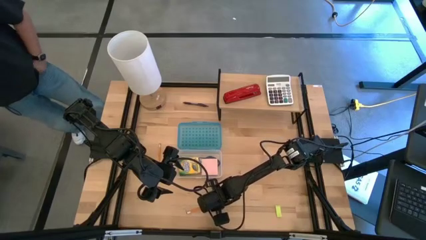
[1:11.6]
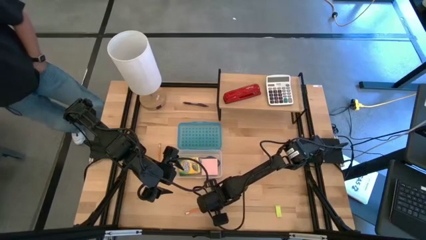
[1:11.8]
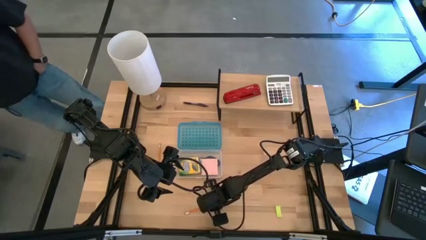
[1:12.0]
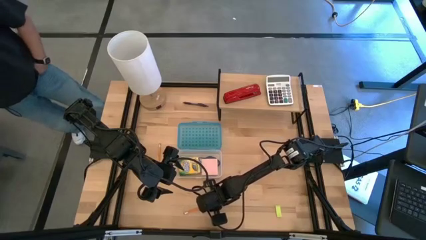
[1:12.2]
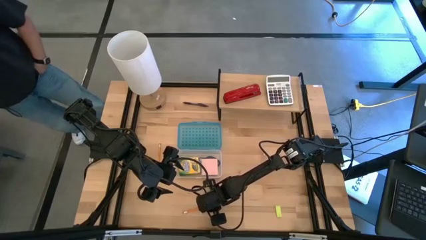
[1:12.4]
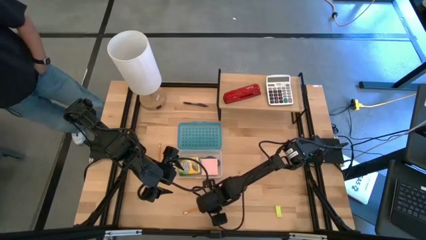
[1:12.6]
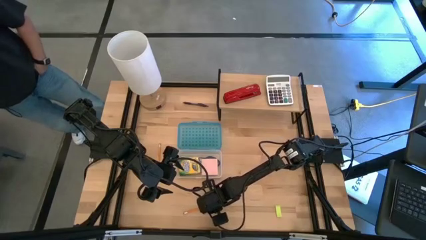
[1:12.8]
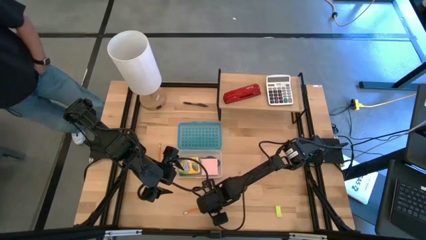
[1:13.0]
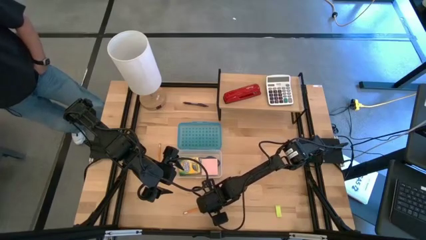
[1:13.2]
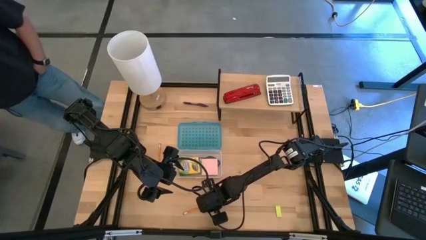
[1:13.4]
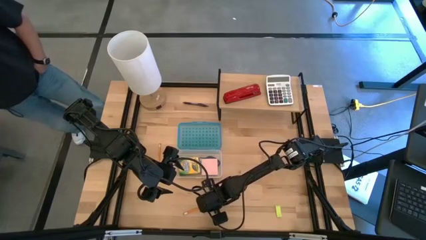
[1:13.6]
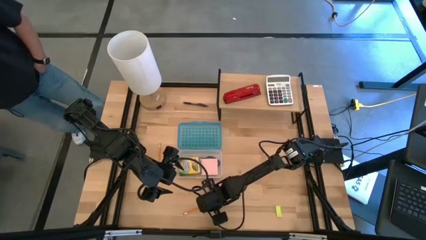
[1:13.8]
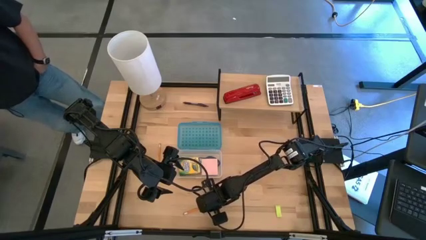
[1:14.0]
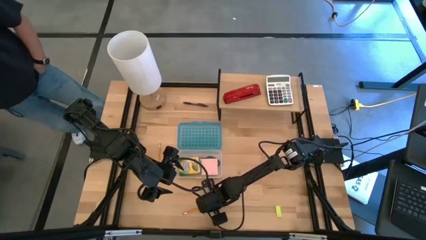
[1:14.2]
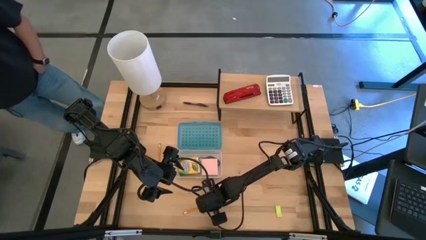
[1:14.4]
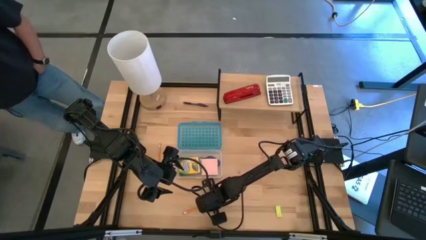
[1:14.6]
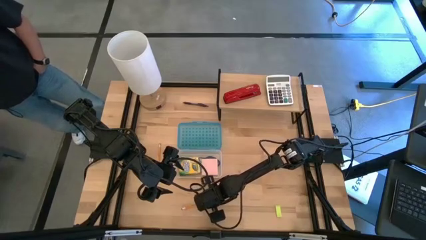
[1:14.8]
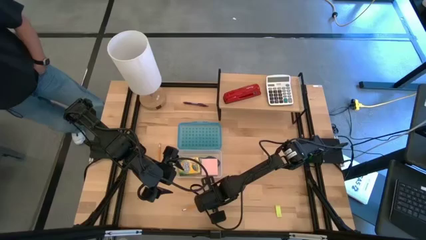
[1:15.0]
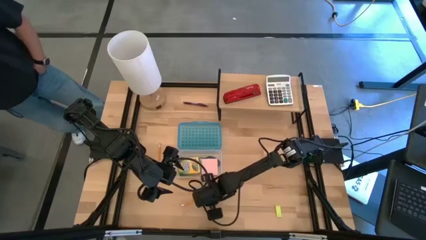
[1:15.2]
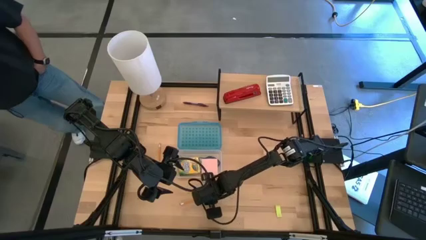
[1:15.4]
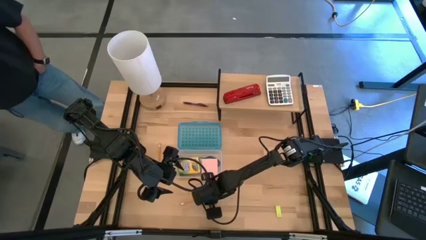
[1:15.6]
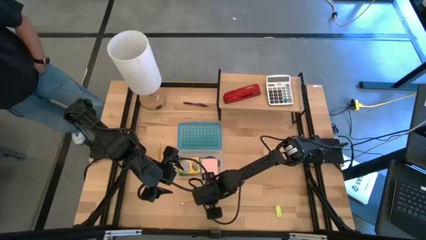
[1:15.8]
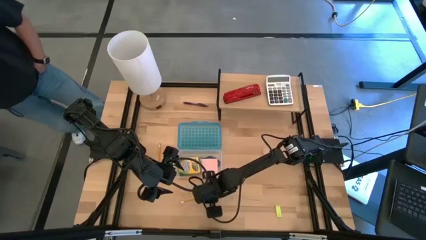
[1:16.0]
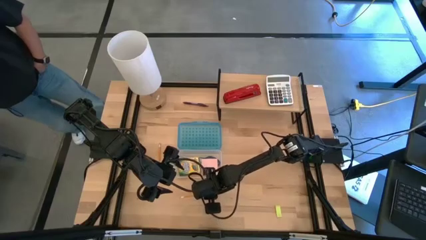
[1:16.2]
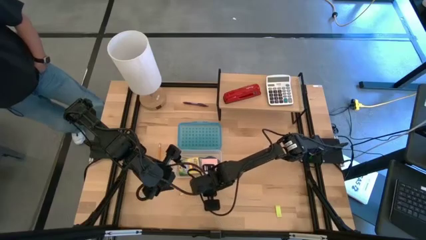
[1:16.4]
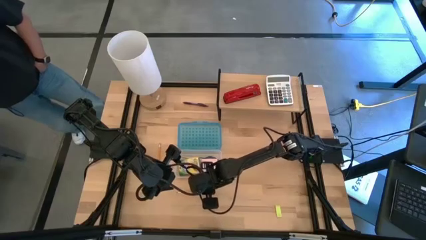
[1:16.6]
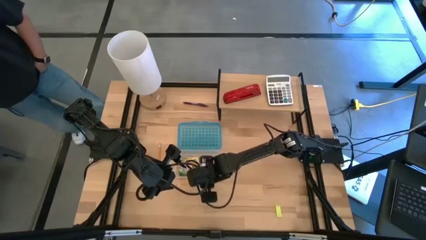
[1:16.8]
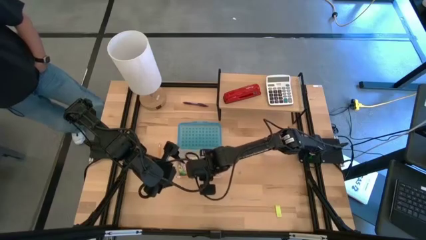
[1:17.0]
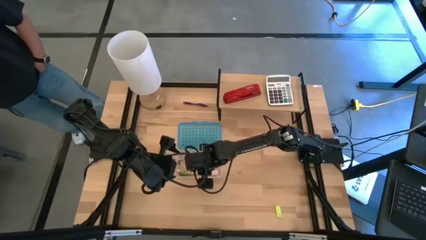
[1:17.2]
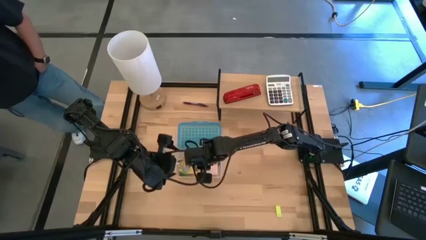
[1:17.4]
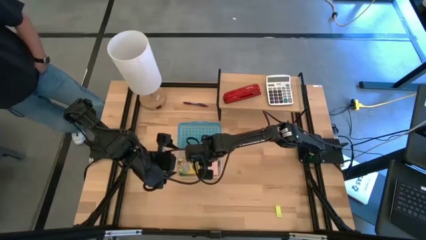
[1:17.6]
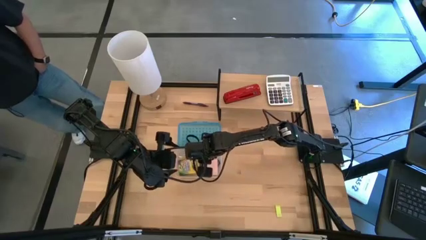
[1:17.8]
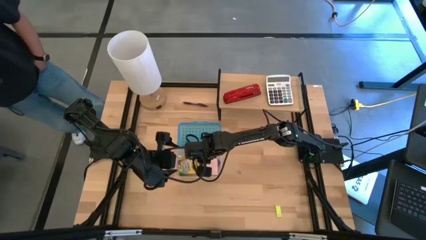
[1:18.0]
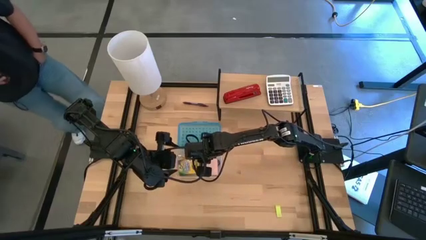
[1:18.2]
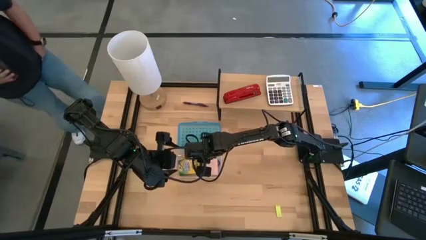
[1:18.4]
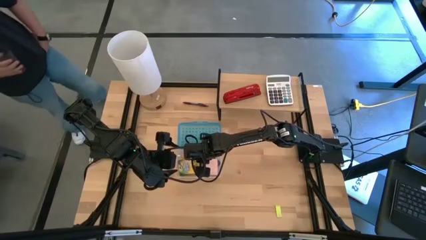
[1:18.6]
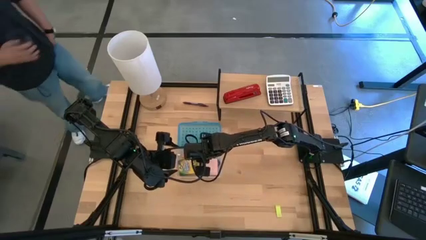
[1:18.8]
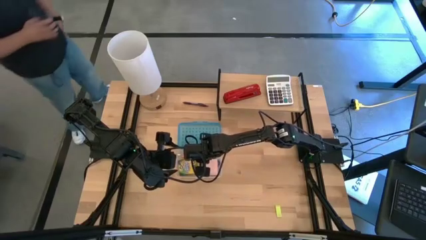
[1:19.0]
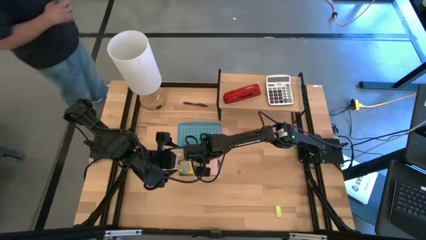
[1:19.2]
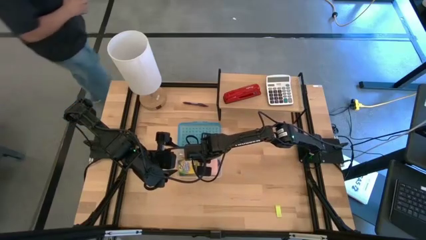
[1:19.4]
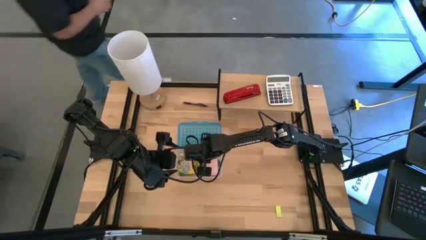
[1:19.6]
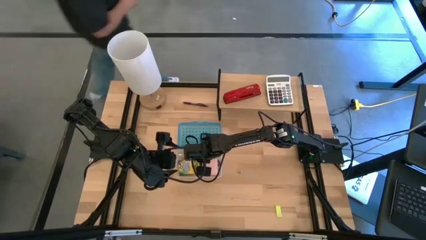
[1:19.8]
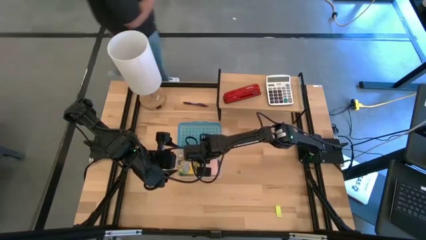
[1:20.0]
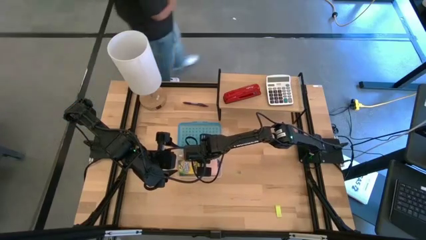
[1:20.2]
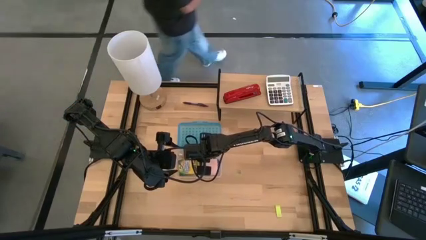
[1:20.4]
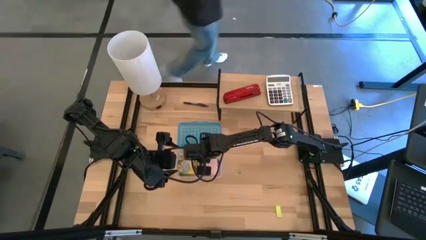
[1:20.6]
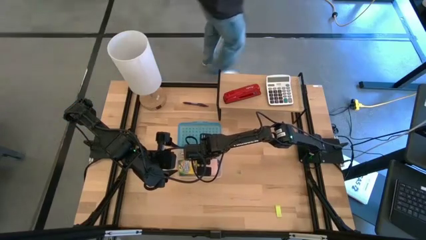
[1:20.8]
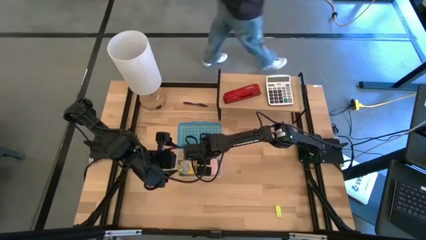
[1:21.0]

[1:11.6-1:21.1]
Task: Pack school essentials
Put the yellow pencil into the blue supply box

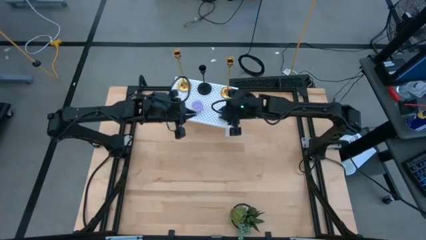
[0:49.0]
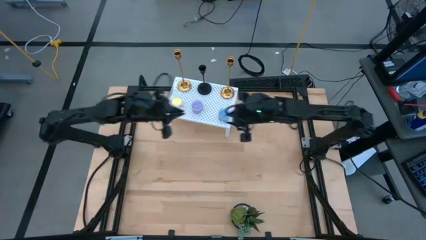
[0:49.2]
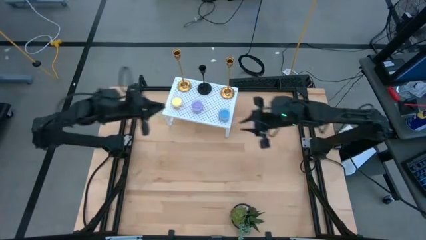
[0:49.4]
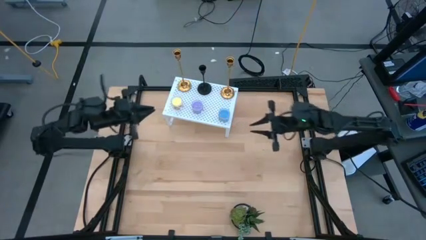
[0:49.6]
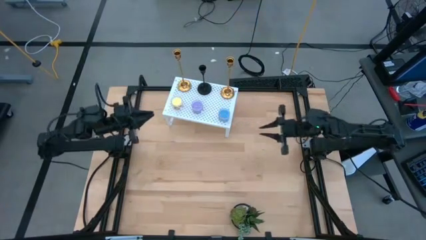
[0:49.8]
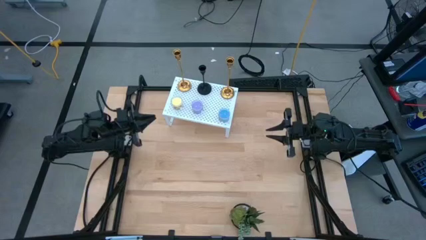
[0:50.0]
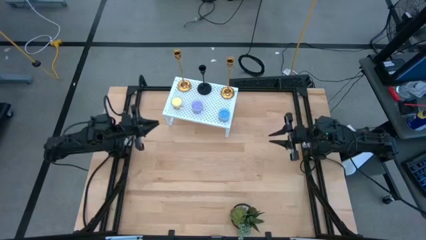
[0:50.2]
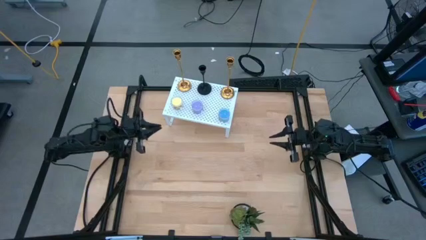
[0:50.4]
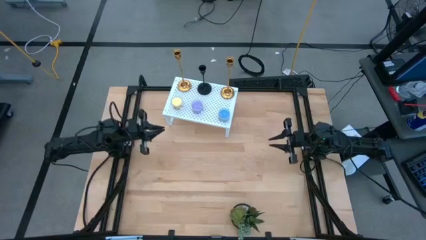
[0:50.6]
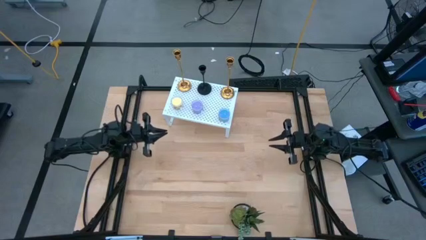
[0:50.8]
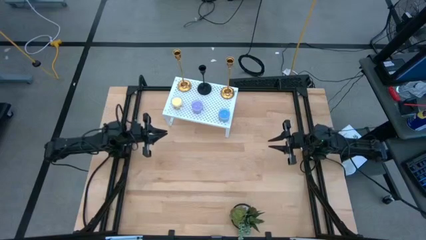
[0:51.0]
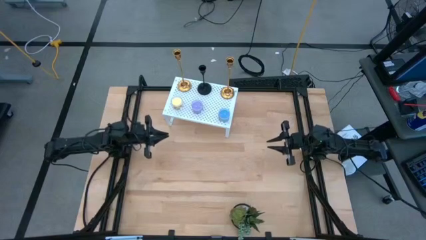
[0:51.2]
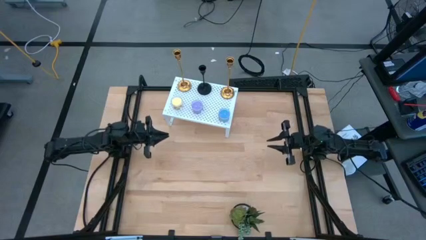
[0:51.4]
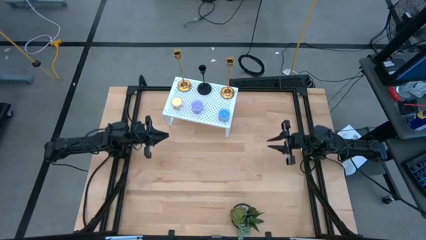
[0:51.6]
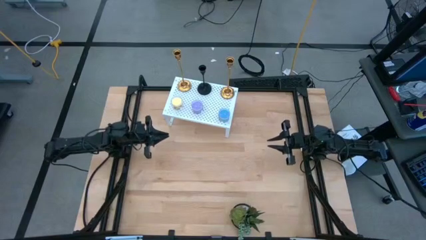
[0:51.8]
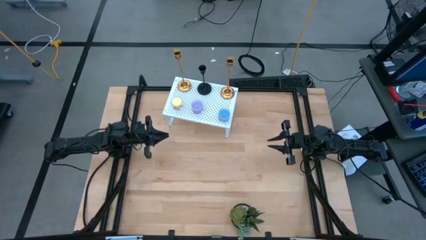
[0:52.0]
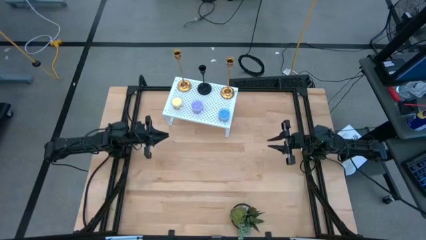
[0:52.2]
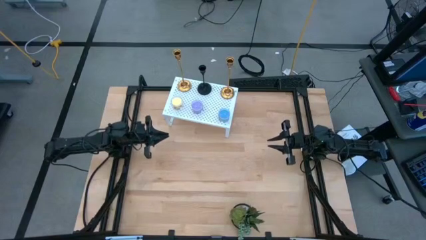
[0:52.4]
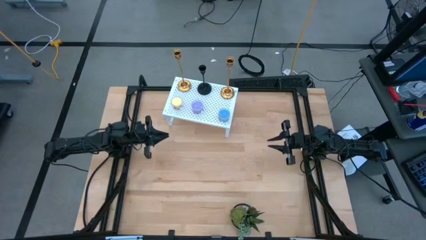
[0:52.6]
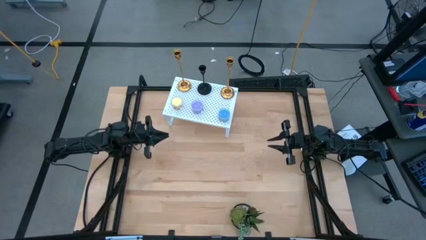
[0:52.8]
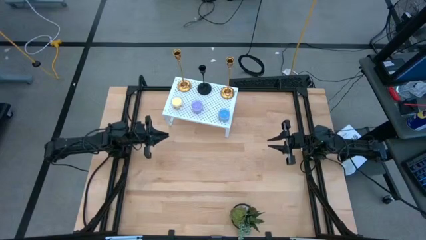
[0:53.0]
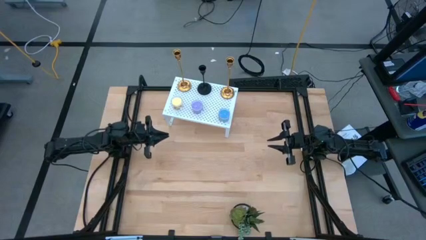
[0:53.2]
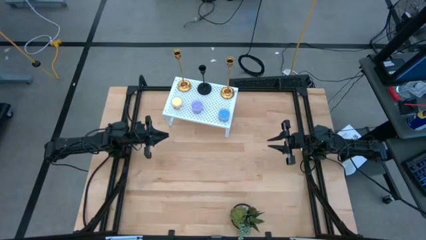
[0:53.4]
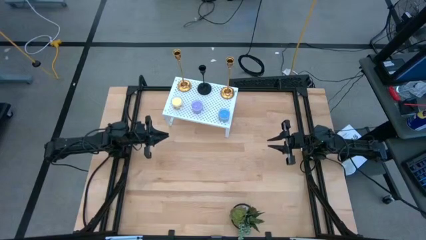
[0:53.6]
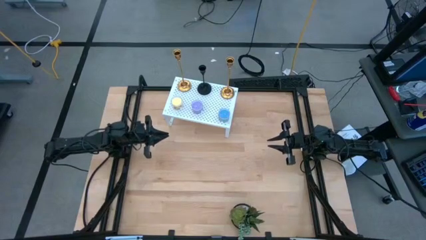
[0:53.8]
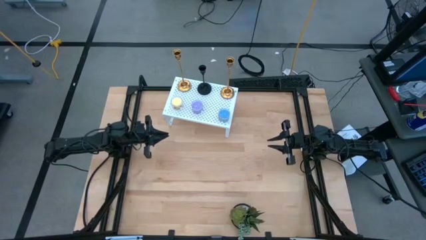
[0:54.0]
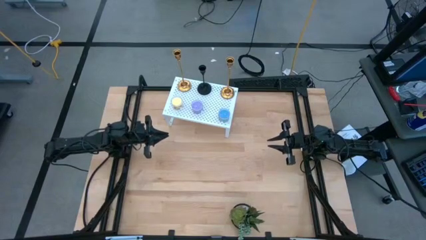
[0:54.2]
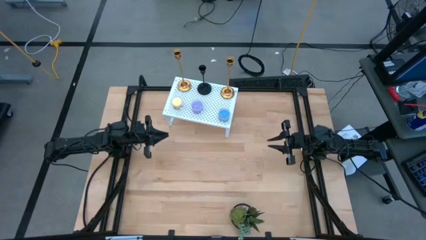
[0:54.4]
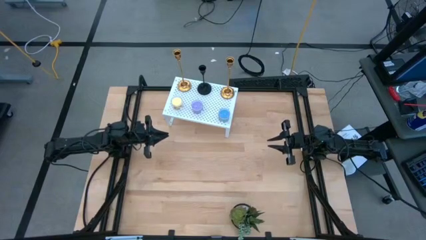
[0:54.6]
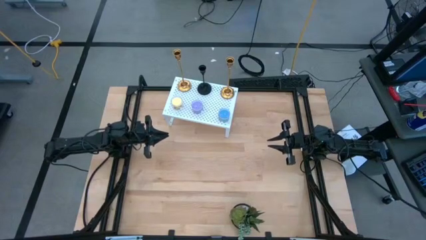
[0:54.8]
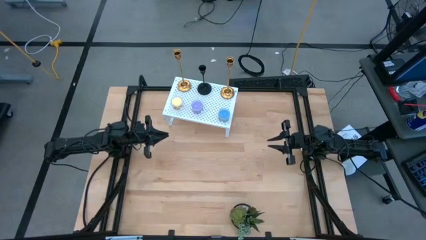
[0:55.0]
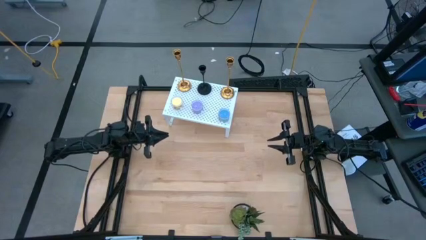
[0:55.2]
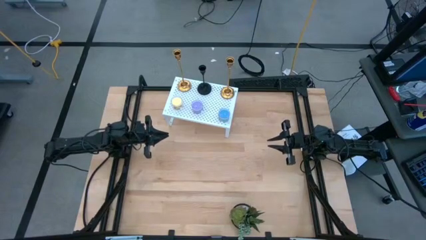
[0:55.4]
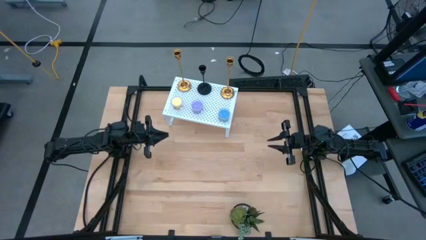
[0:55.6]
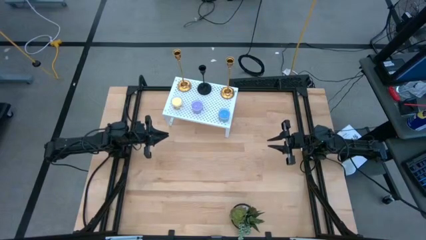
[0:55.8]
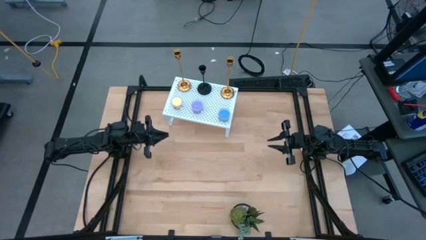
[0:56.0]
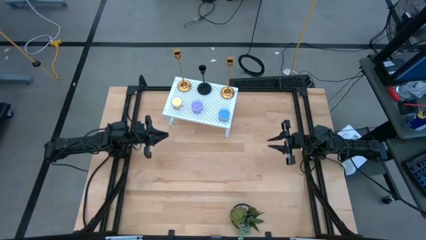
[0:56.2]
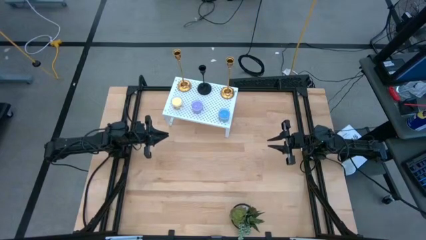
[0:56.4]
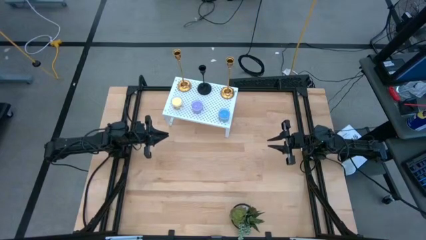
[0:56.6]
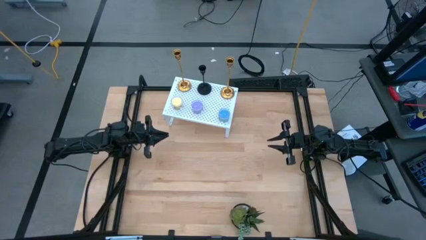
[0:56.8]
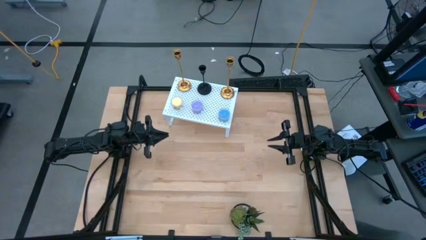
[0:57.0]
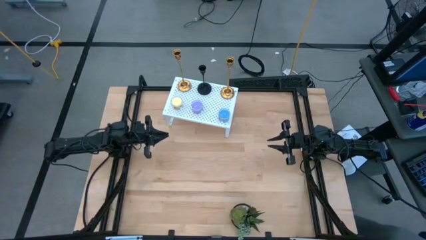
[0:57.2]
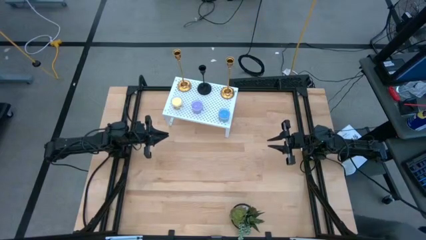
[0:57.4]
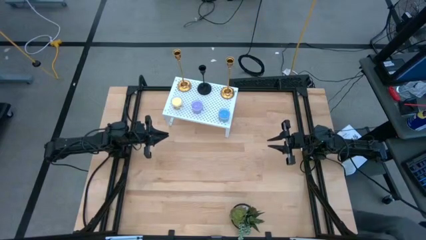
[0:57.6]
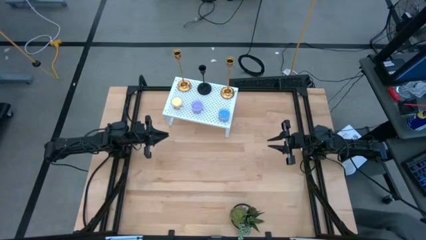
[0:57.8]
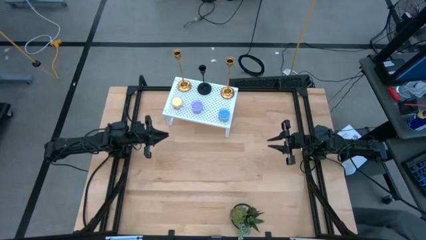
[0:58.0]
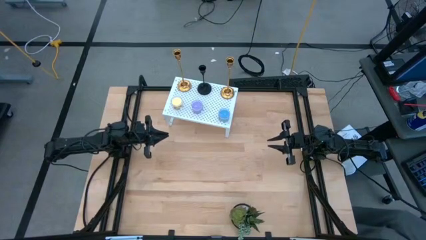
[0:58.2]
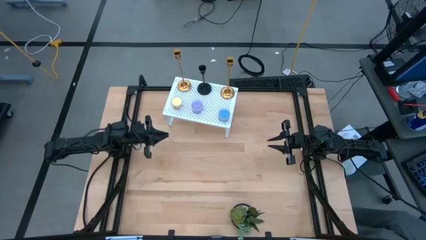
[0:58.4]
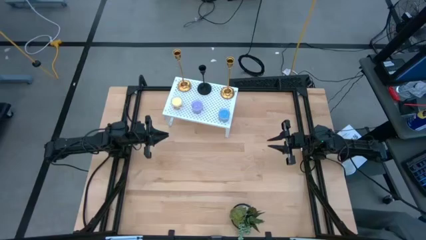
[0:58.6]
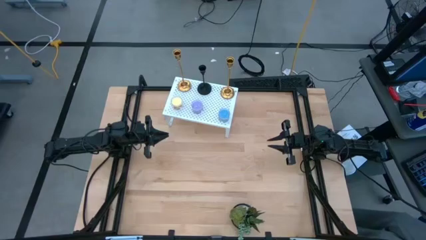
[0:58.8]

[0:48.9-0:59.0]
Task: Pick & Place candle stick holders
Return to Home Position
